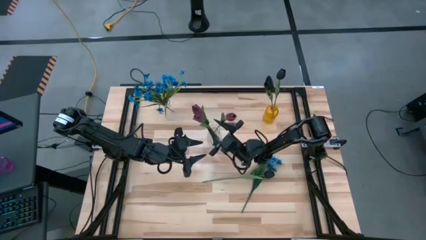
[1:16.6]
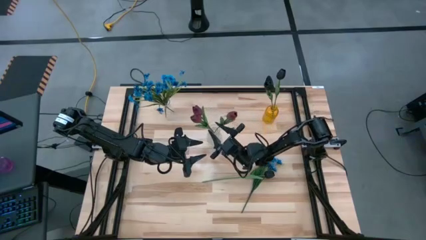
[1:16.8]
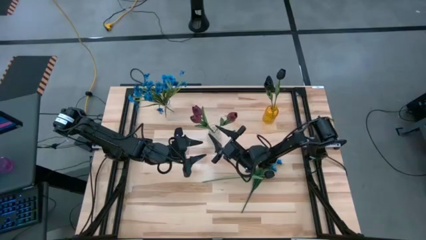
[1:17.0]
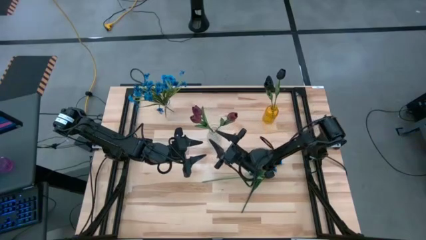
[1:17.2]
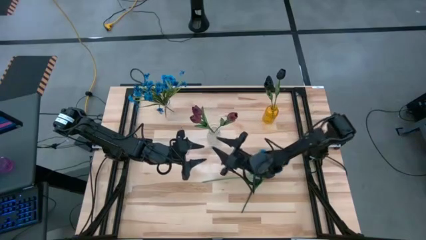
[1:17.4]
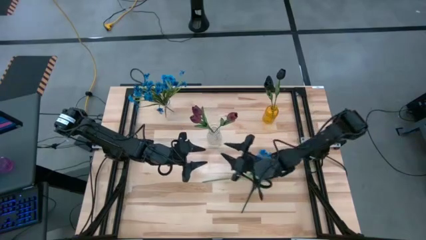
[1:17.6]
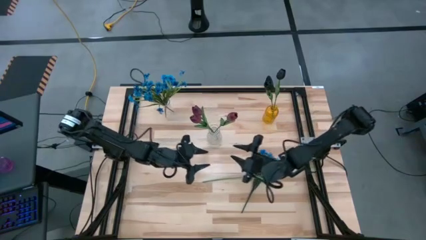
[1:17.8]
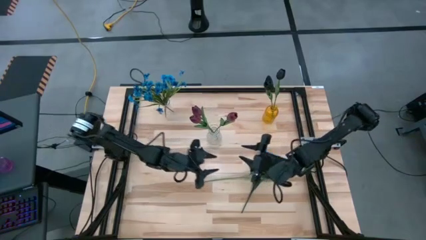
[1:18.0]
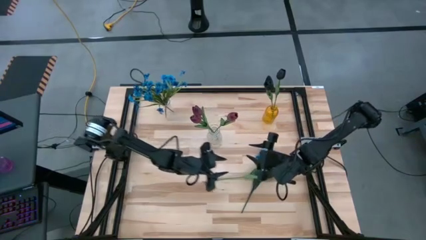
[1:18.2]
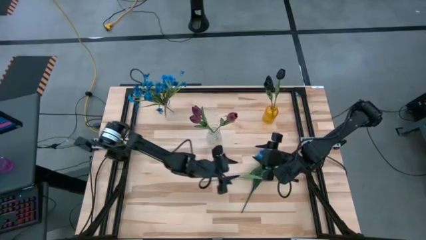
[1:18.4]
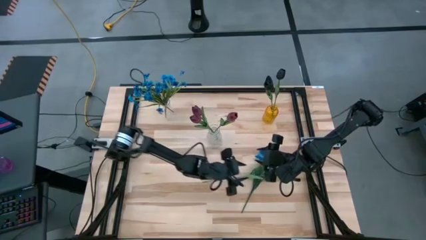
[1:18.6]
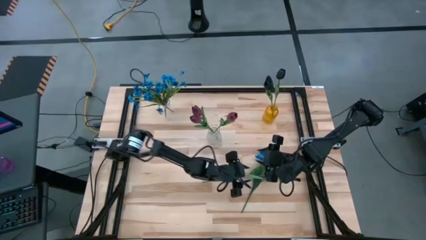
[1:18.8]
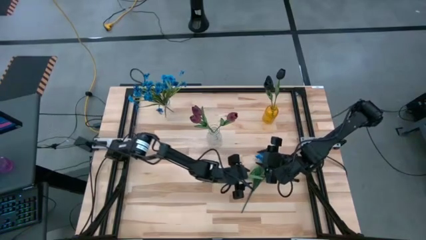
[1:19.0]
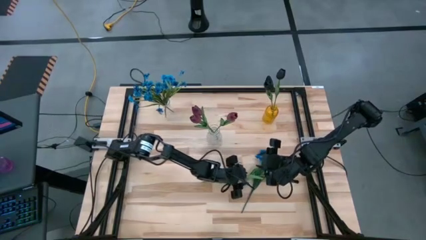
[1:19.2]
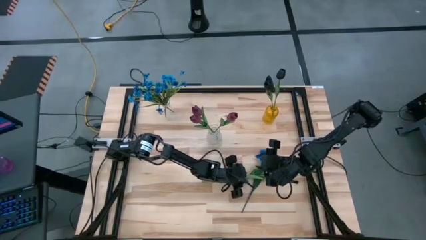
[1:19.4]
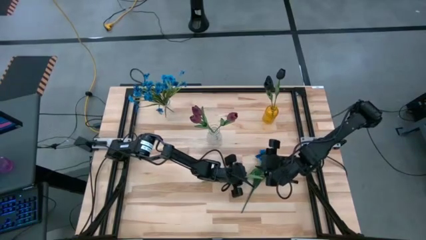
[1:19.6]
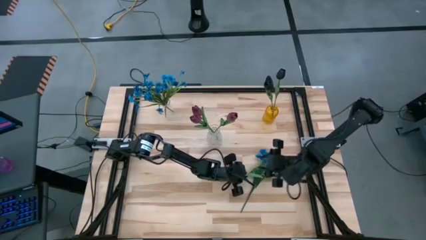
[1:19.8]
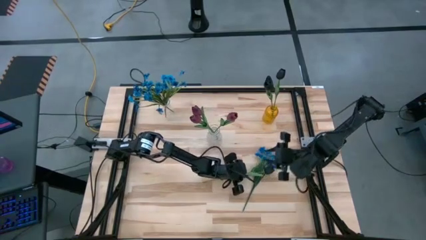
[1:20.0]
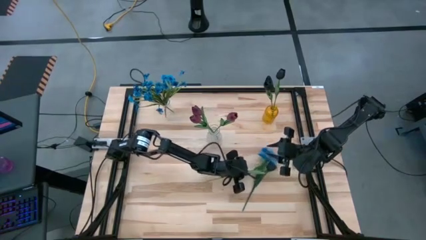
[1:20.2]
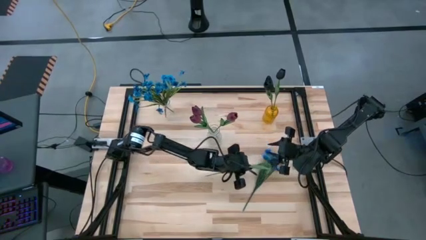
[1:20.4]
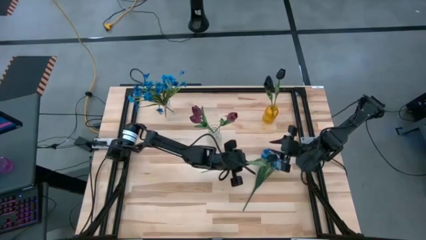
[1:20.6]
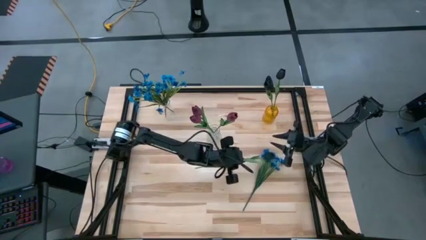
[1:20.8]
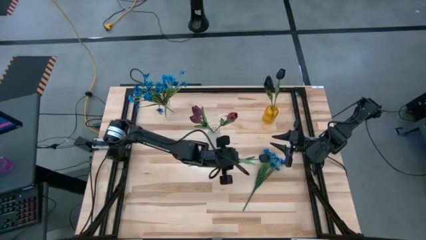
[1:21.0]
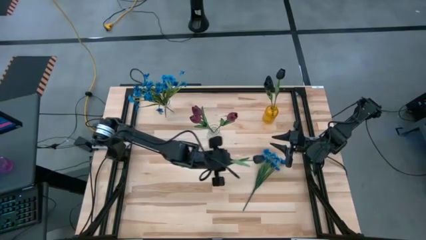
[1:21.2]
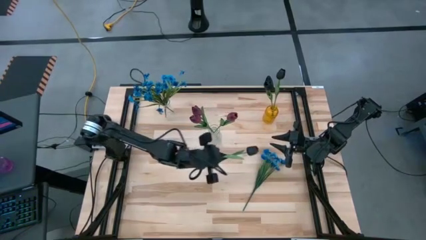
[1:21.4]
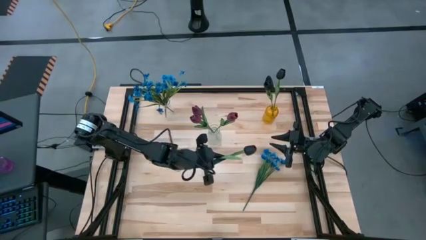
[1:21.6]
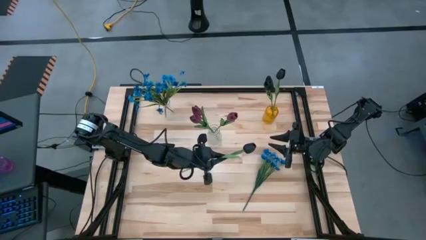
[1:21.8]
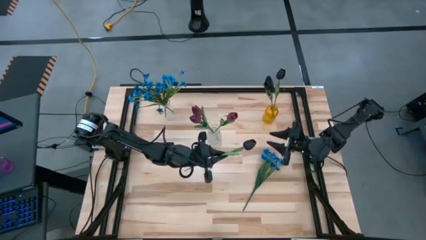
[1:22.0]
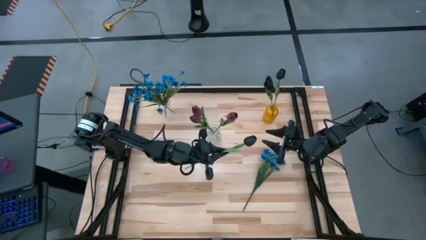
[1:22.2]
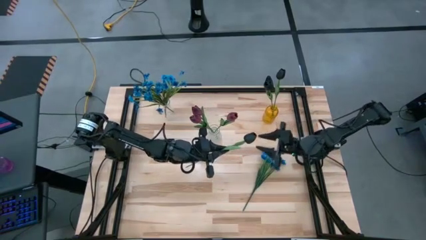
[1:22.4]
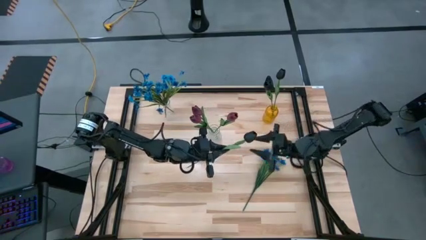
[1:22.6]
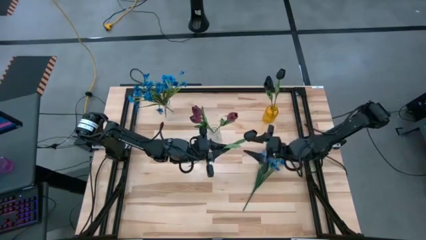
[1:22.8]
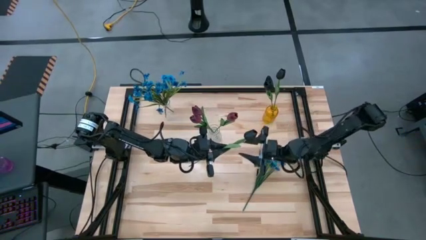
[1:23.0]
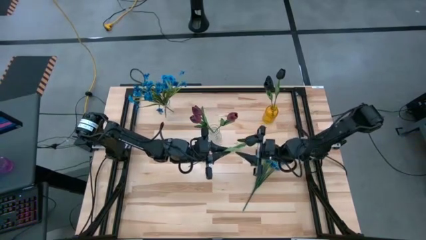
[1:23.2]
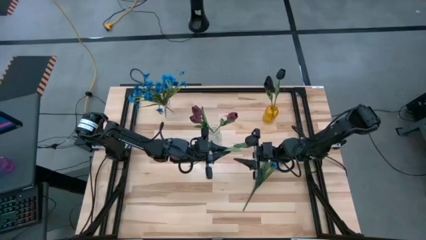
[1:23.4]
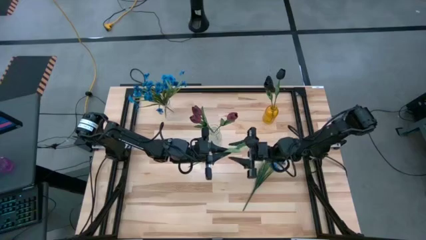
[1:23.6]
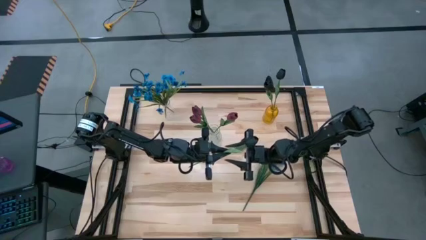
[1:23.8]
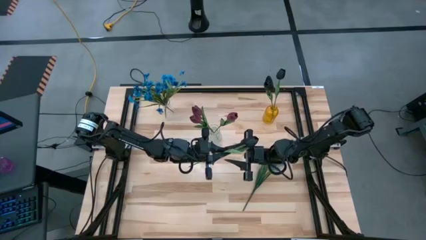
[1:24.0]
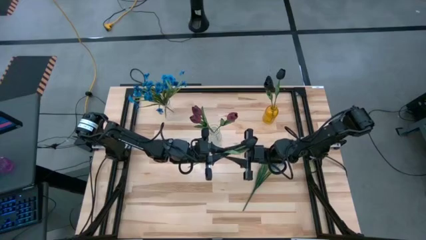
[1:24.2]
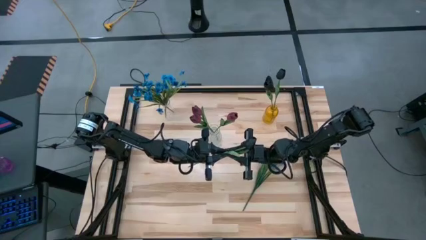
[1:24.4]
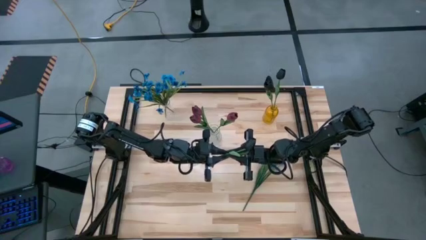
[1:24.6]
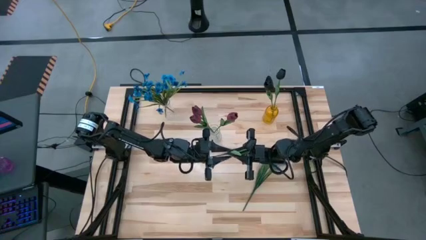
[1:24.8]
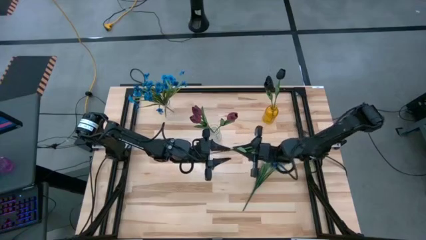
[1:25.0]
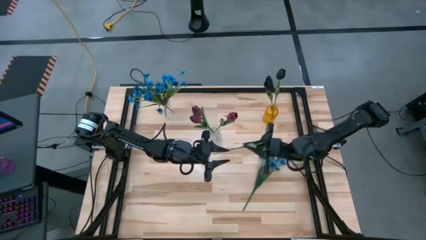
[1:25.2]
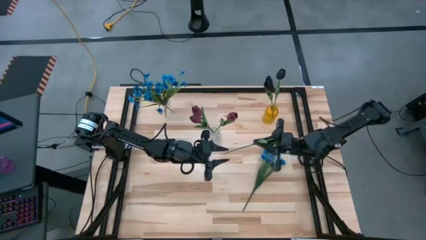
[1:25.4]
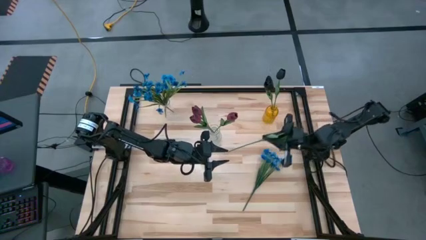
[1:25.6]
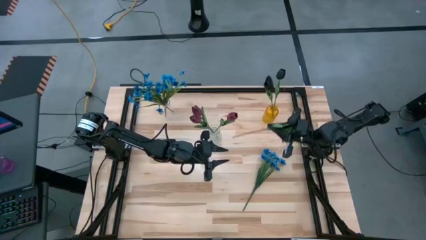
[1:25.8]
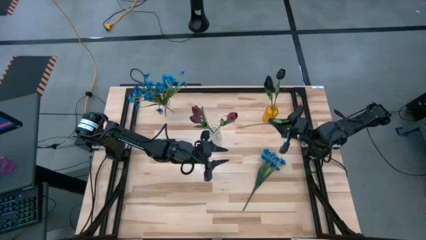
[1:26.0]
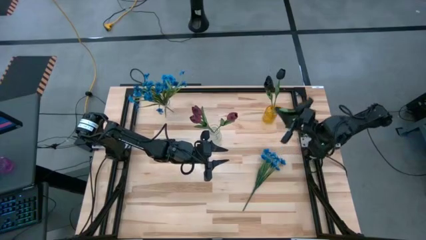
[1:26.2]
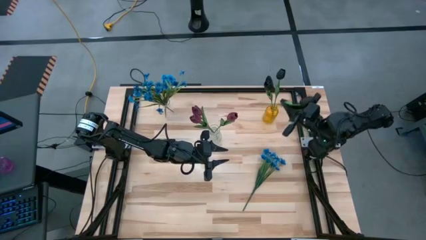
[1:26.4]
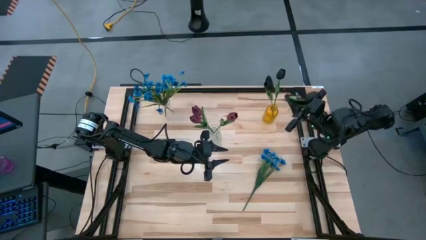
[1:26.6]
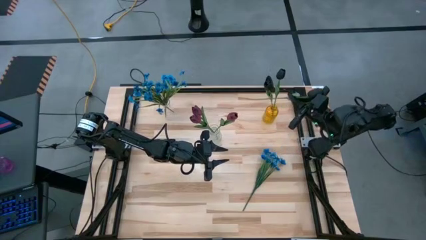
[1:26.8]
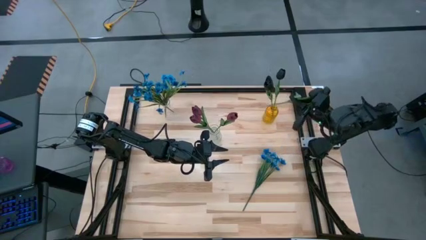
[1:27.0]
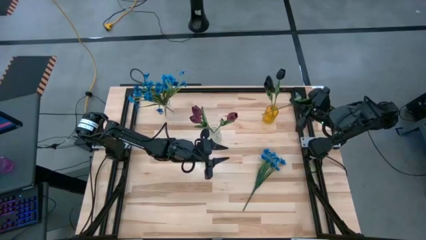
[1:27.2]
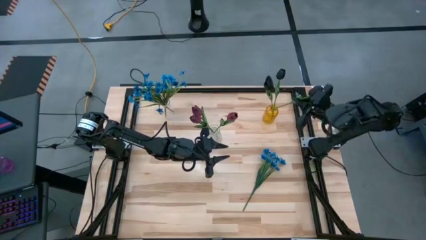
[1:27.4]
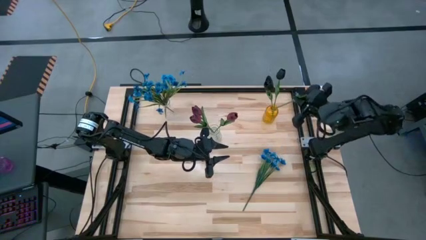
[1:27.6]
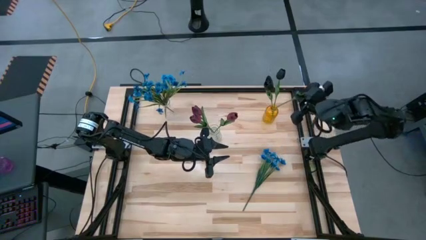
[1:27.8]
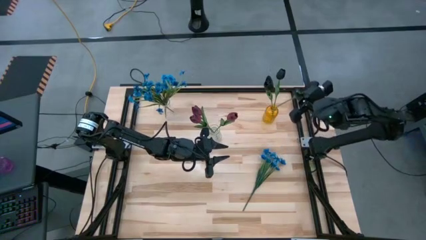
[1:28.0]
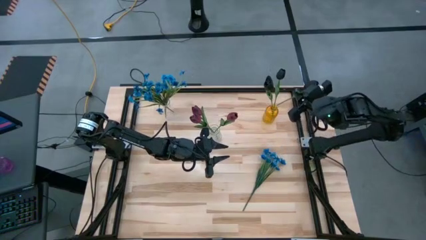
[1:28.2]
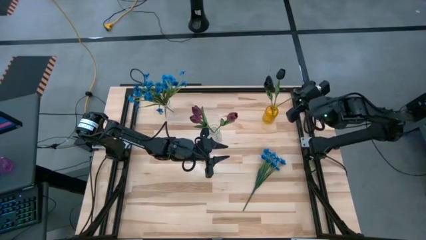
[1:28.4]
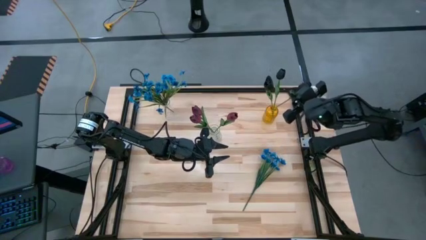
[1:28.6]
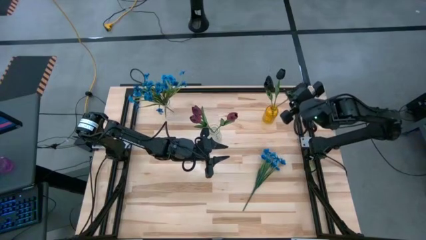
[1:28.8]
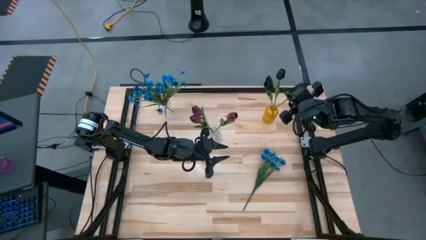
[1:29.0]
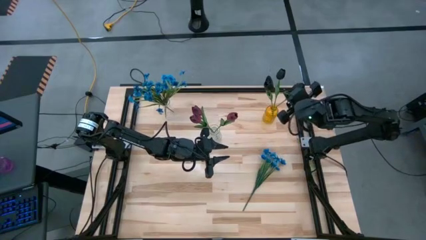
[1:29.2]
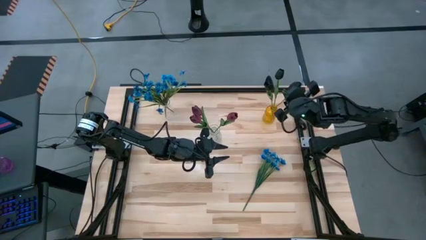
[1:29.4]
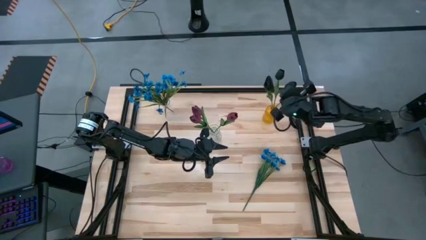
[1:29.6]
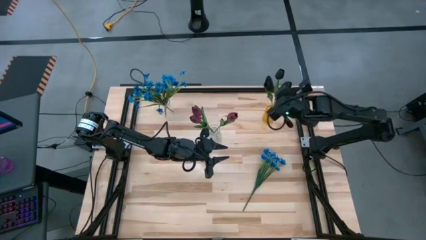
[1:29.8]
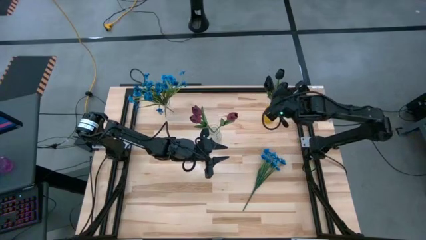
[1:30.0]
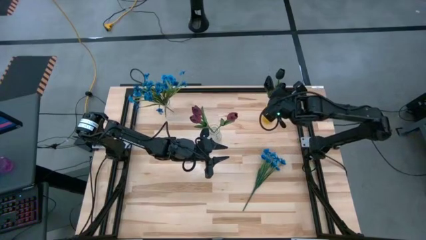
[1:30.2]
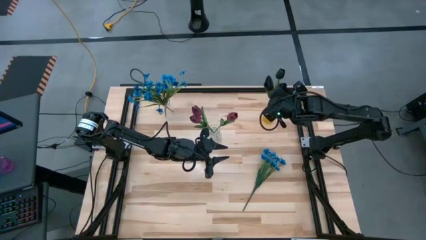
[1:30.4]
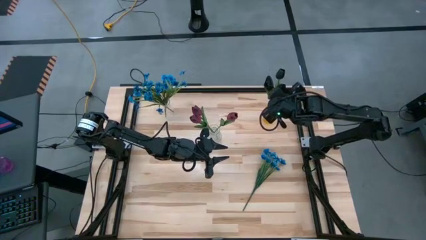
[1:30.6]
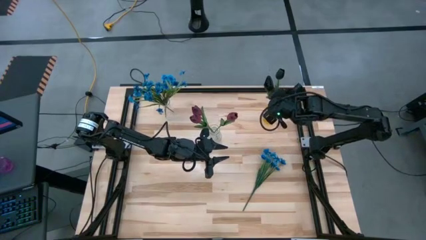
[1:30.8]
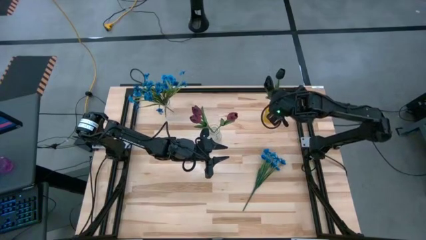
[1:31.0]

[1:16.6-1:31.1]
Task: Sort flowers into vase by color
Put the black flower into the yellow vase
